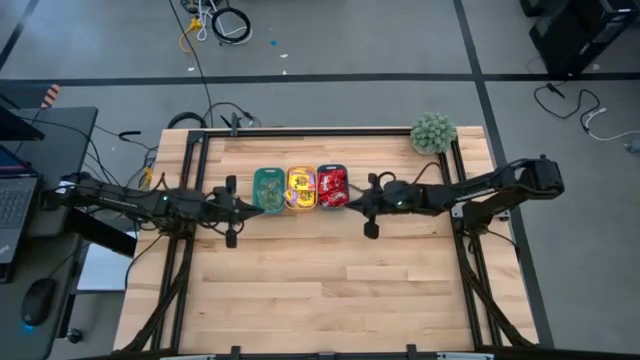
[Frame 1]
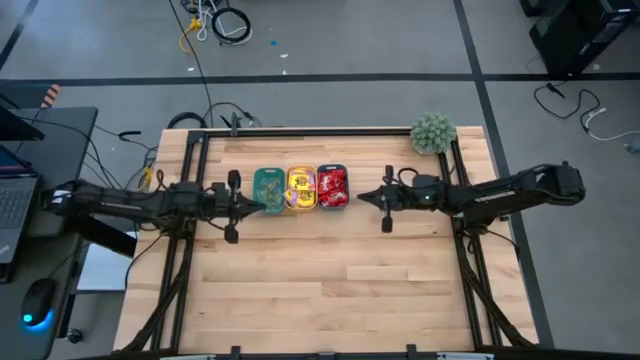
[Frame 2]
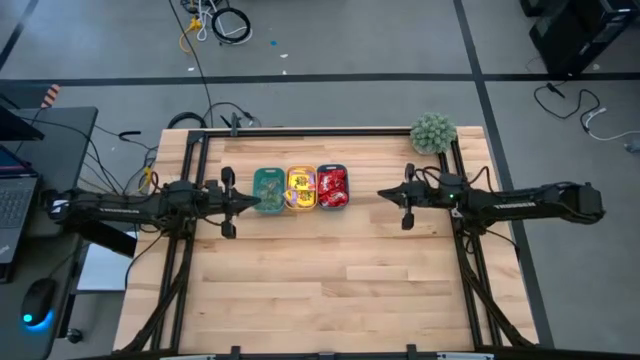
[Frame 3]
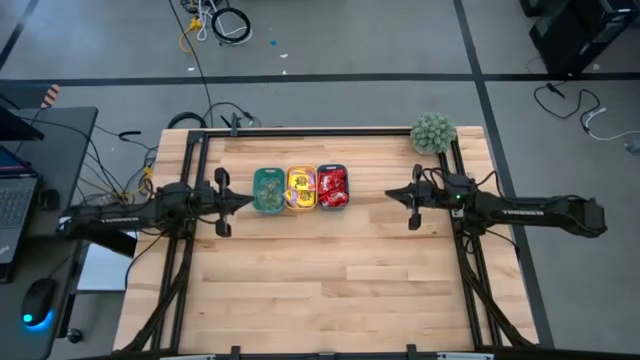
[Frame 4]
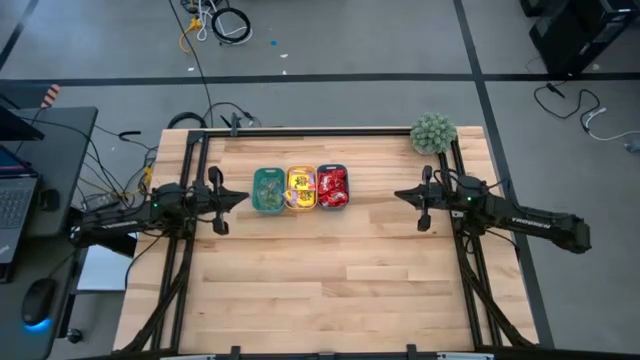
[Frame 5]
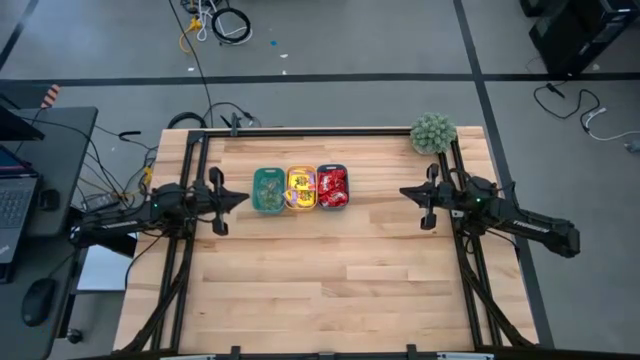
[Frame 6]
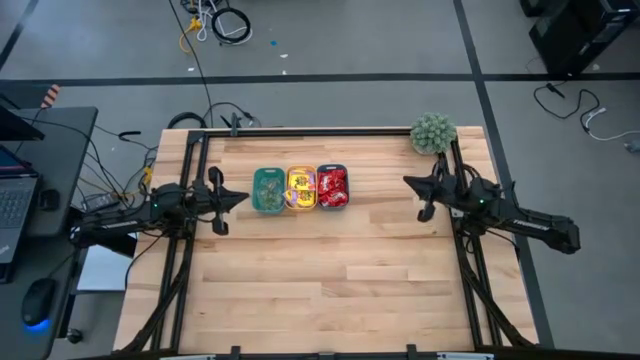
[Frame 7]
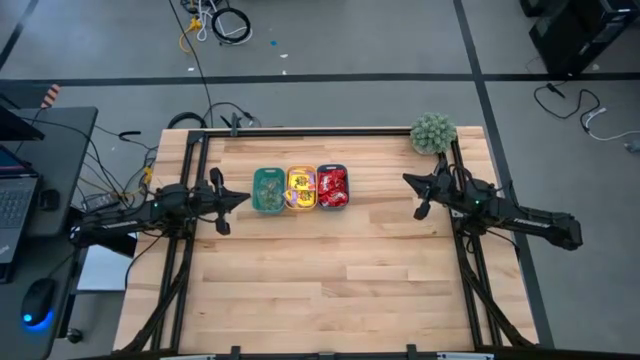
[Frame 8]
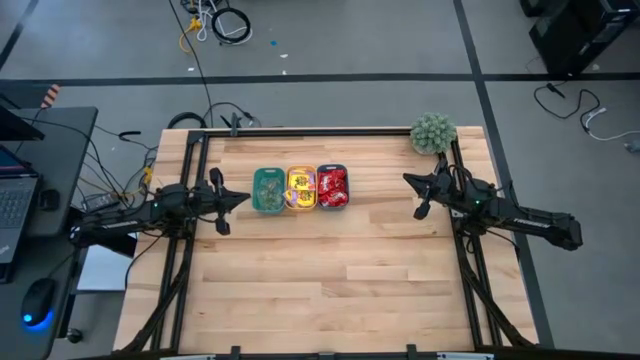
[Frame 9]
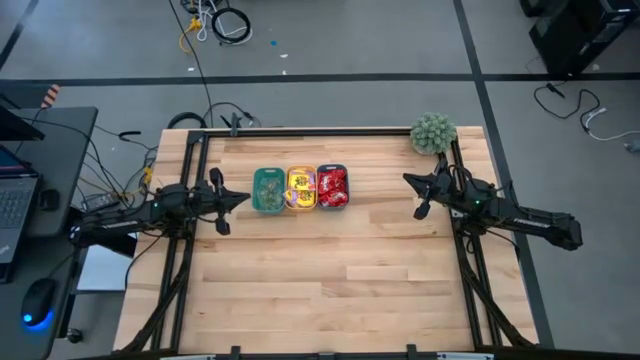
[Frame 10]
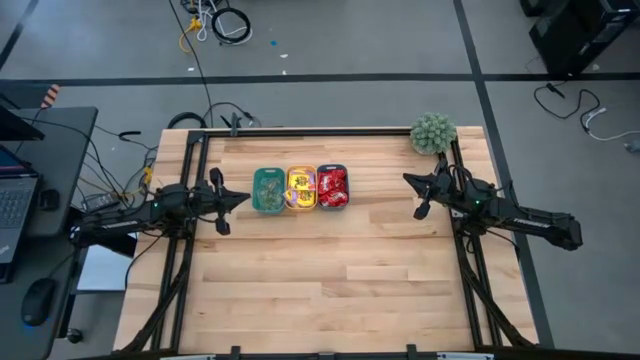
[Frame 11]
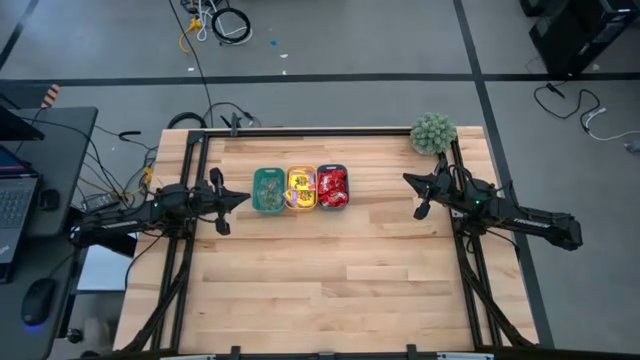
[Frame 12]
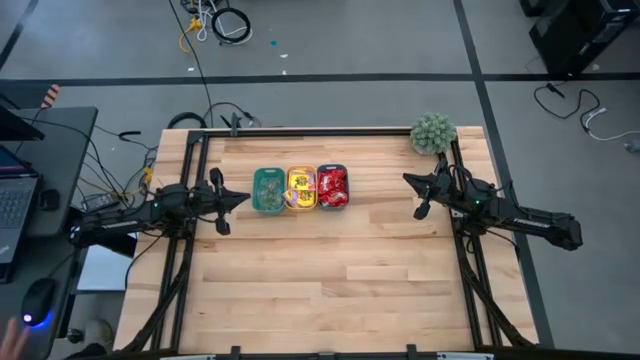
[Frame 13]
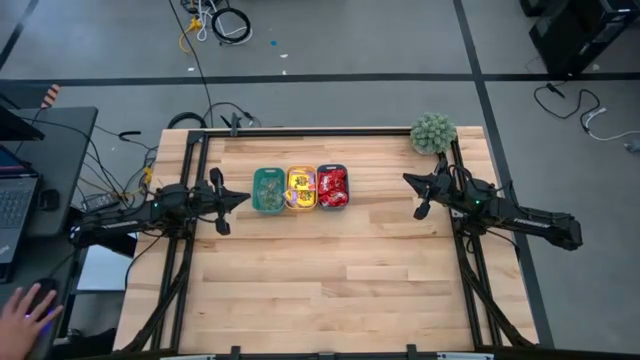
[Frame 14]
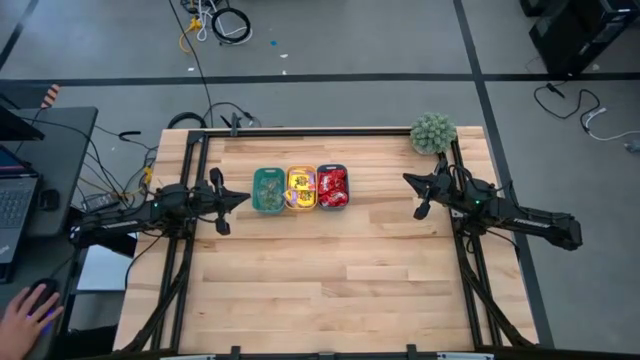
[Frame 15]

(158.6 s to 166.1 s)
Task: Sort candy
Return to Home Position

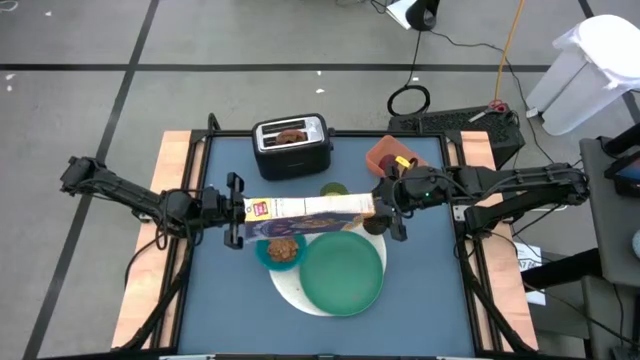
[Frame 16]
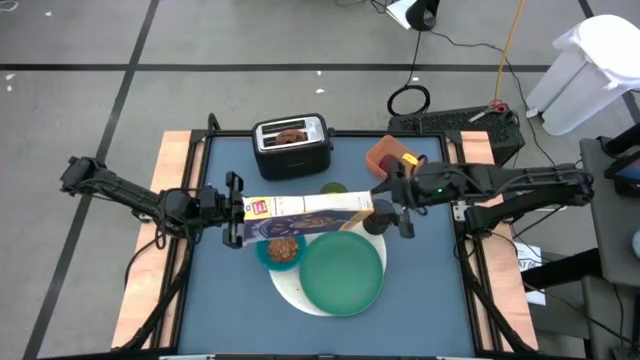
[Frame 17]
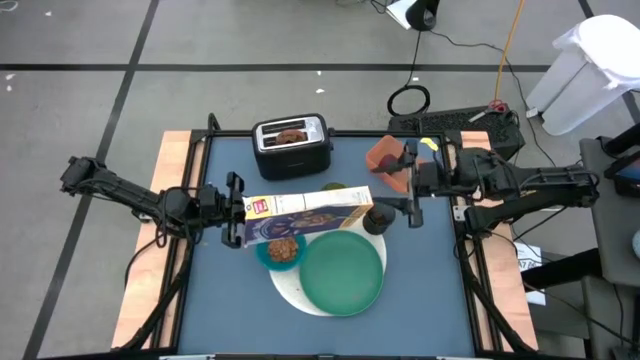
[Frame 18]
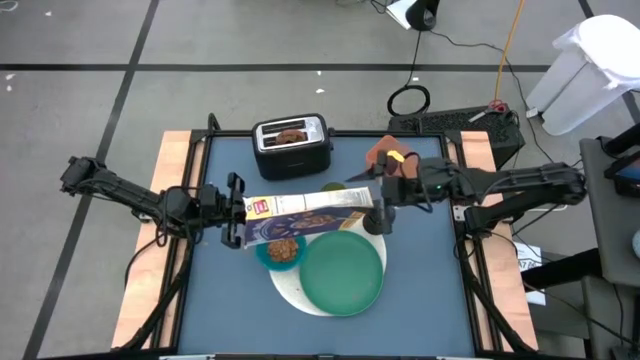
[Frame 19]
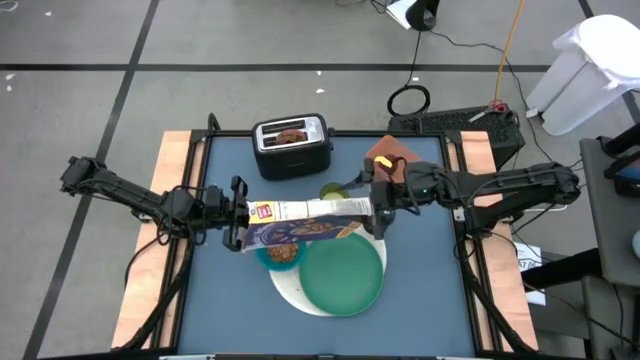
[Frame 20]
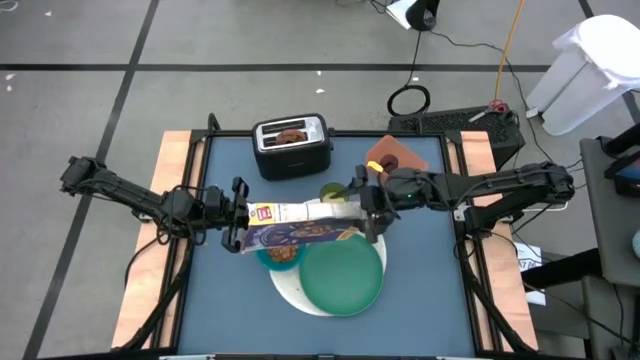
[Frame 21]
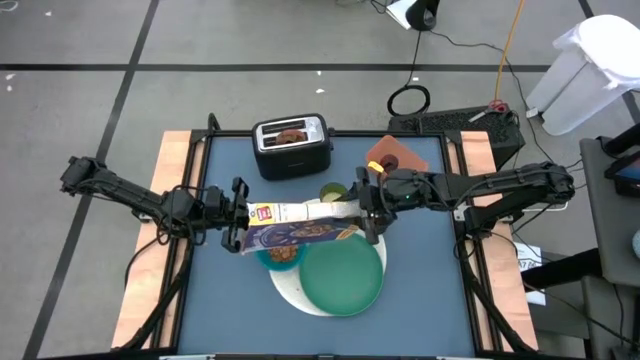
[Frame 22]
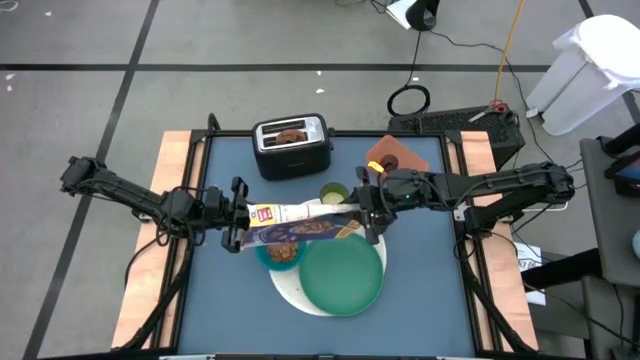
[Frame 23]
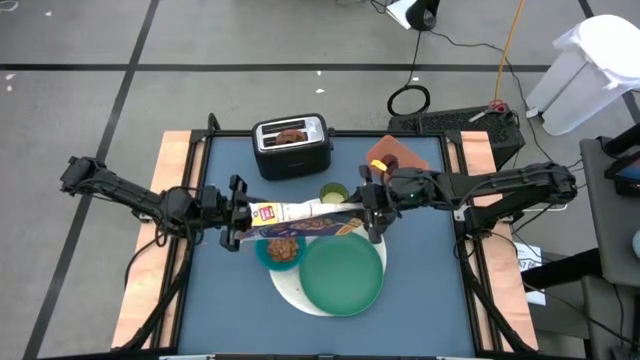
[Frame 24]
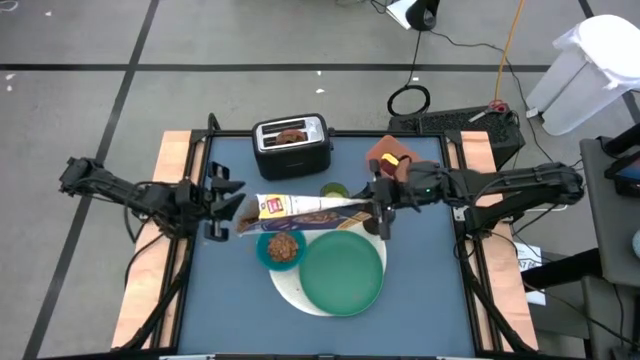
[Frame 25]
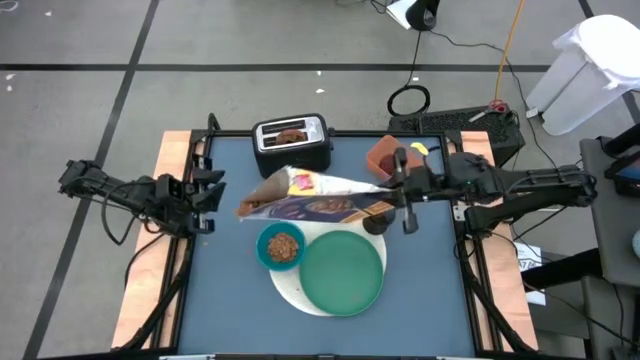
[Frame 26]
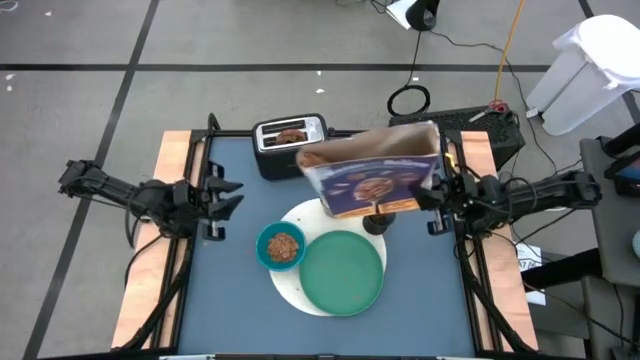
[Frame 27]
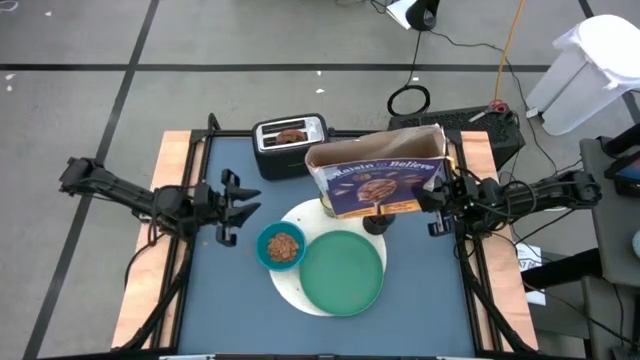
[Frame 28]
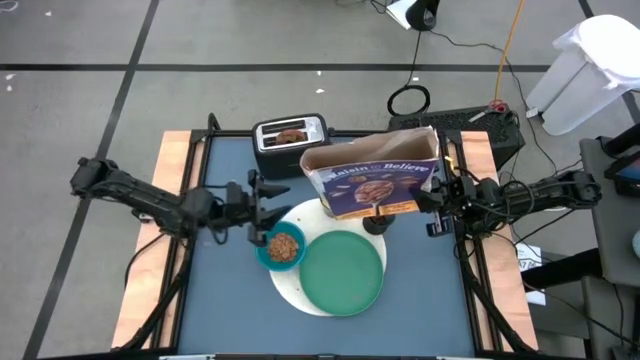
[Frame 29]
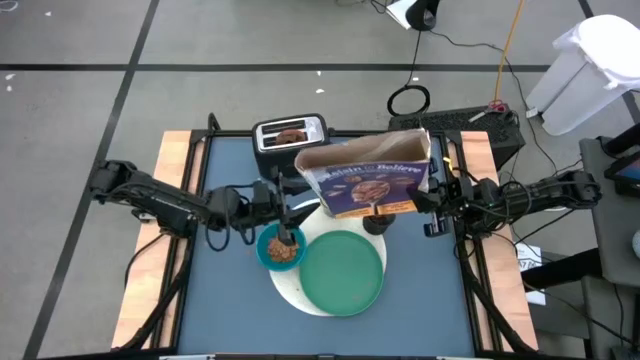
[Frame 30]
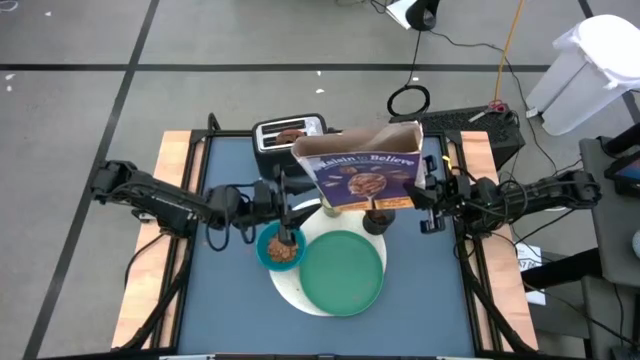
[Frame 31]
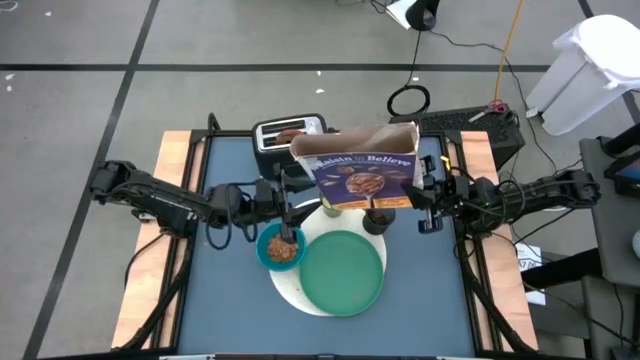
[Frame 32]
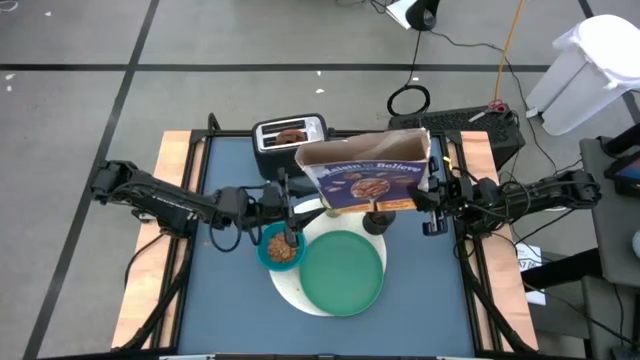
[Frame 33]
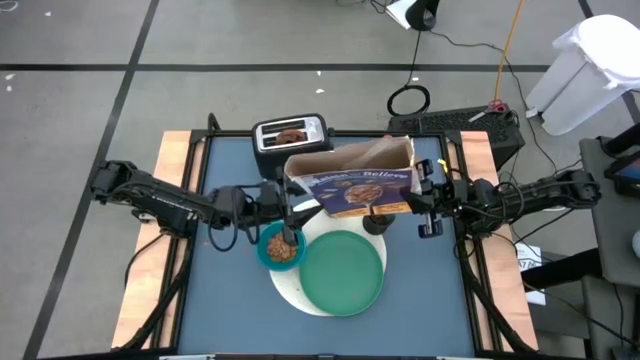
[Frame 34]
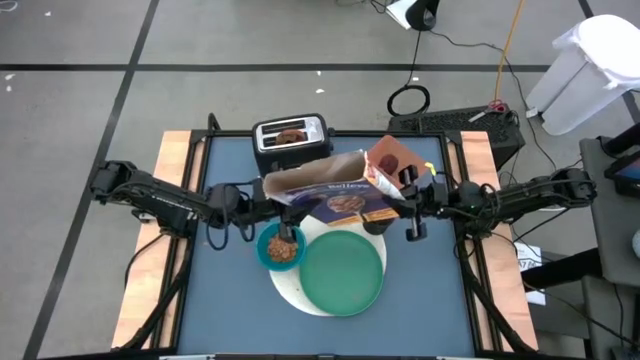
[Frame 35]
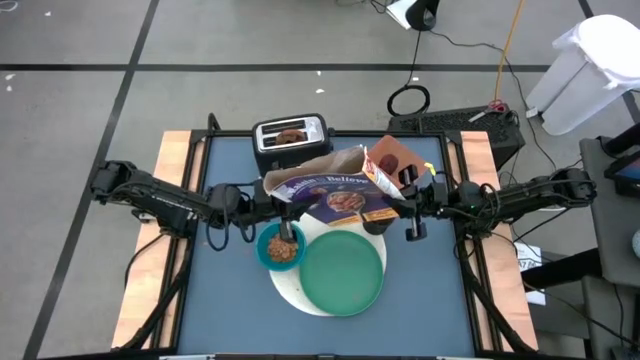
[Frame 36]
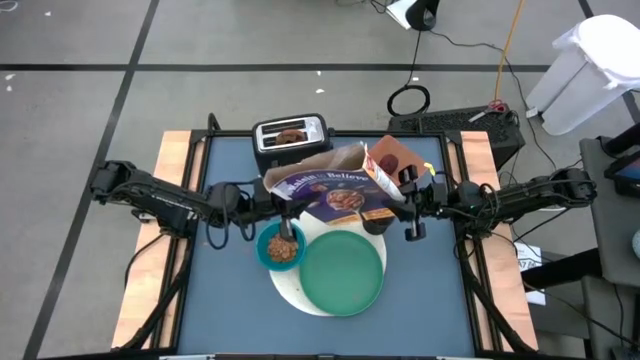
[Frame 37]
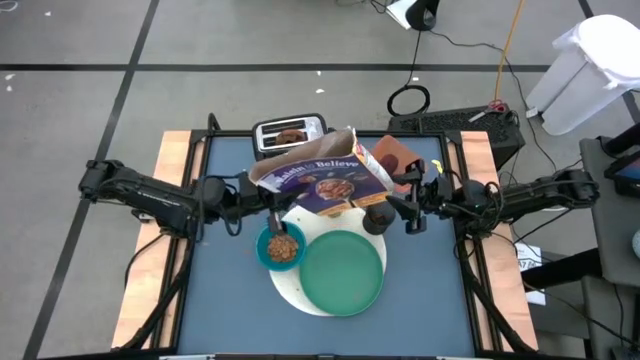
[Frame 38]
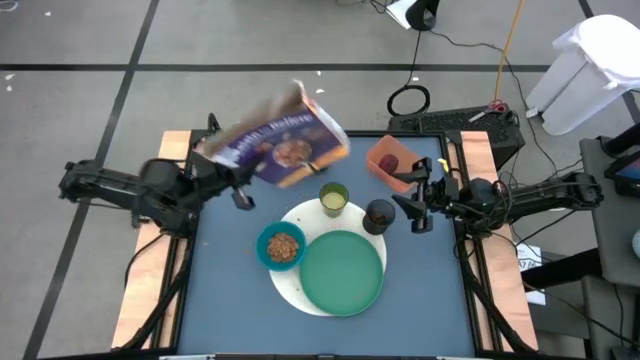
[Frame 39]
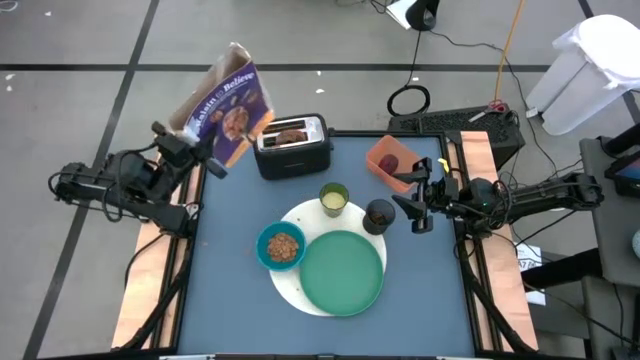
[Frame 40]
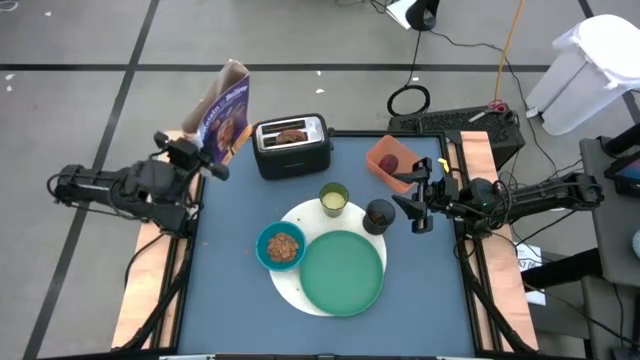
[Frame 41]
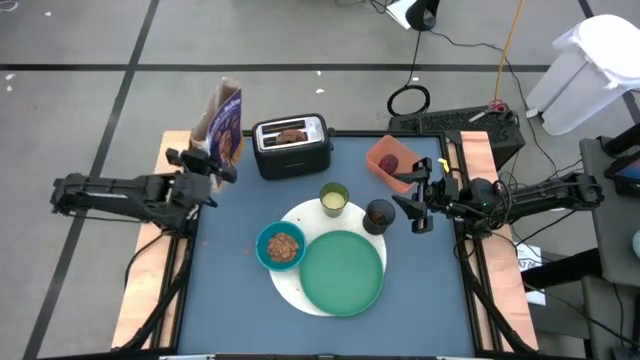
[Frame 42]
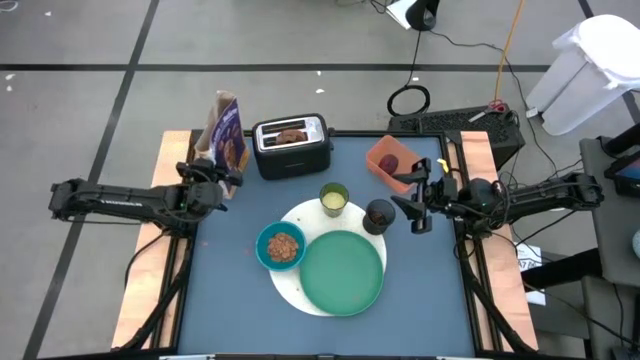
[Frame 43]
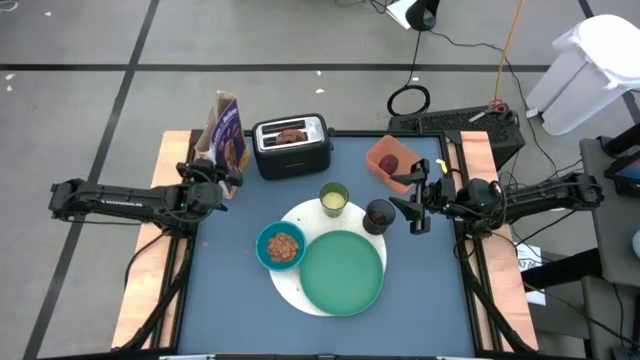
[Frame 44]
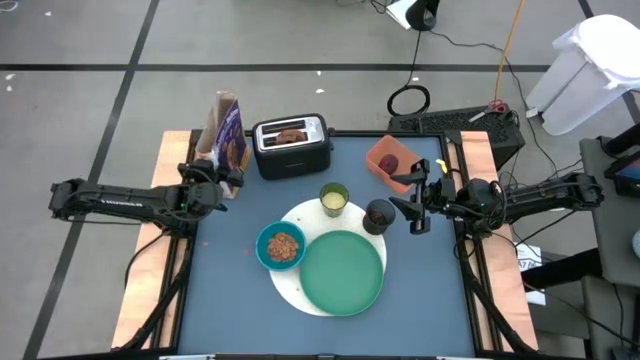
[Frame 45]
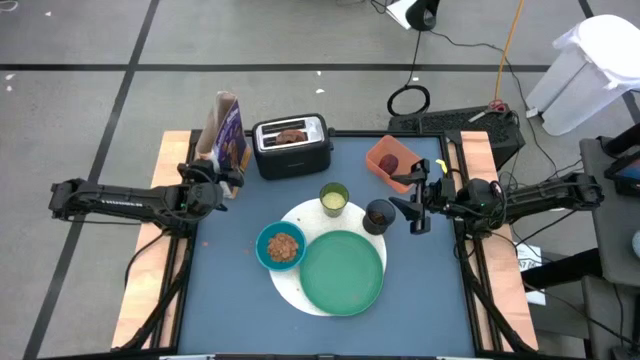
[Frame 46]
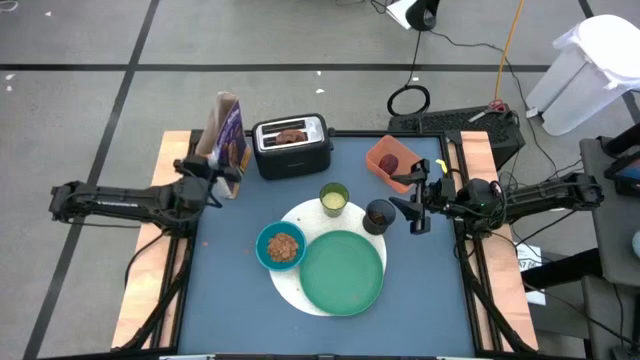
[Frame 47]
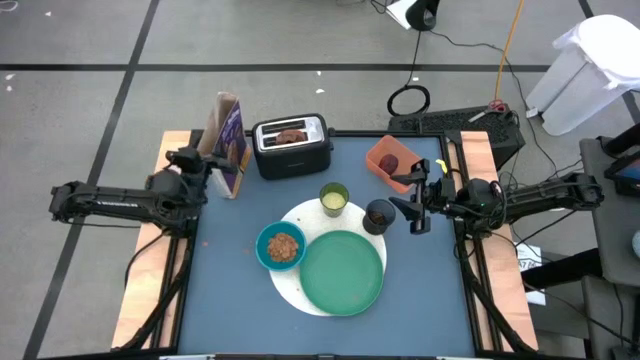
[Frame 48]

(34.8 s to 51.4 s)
Task: Arrange a breakfast setting
Pour the cereal from the purple cereal box into the blue bowl
